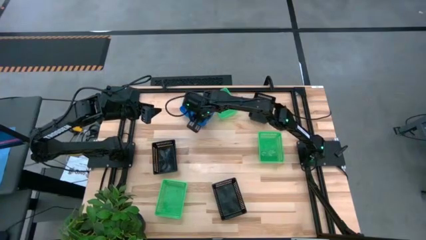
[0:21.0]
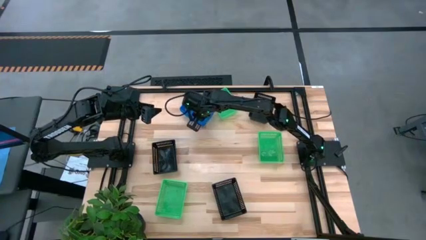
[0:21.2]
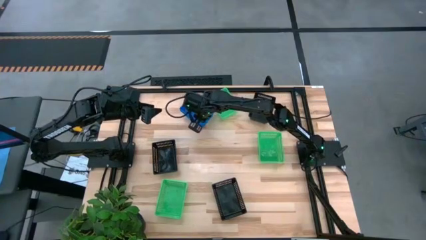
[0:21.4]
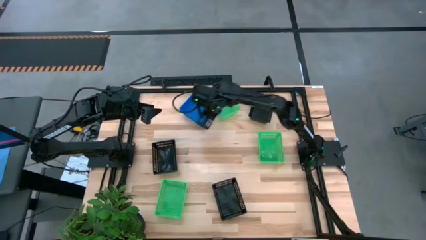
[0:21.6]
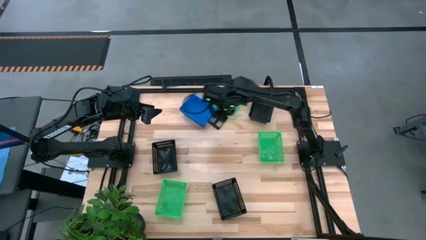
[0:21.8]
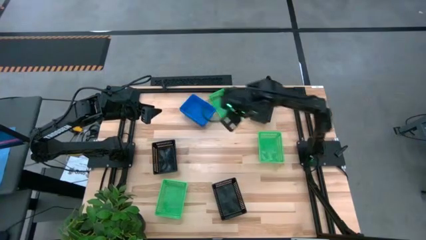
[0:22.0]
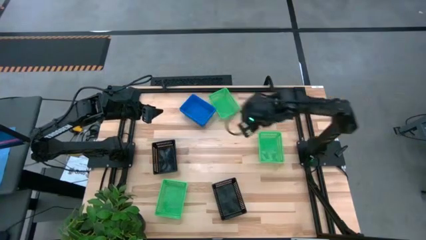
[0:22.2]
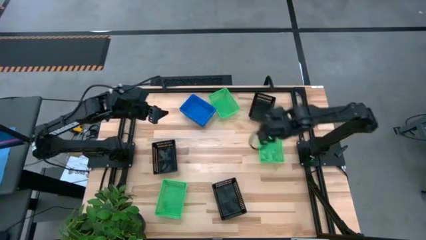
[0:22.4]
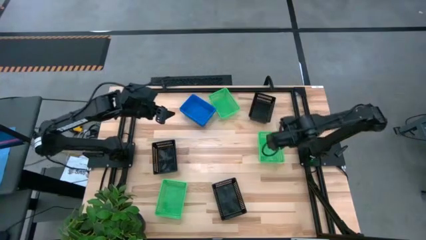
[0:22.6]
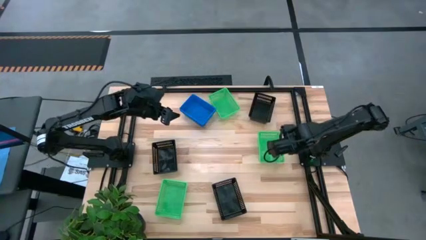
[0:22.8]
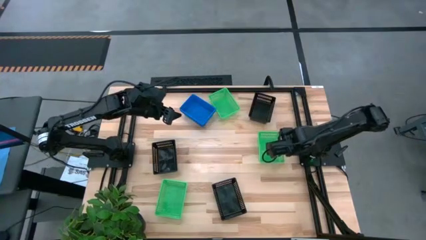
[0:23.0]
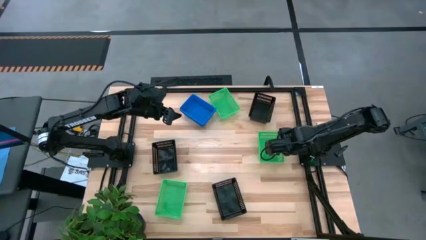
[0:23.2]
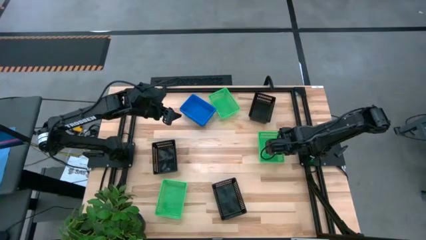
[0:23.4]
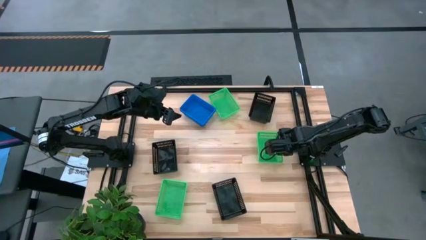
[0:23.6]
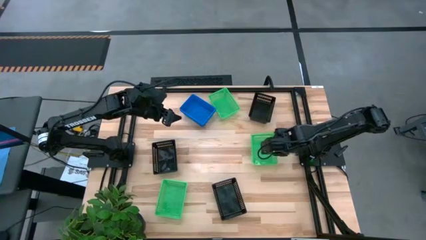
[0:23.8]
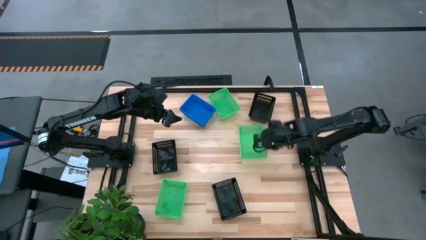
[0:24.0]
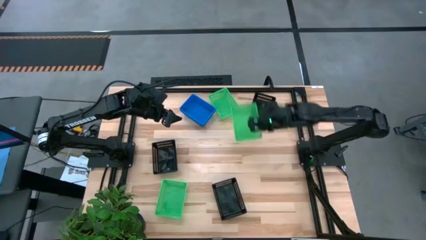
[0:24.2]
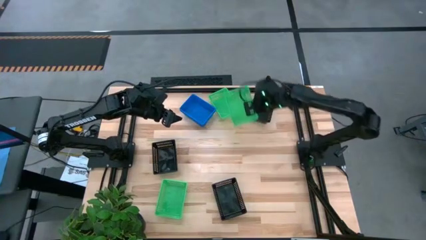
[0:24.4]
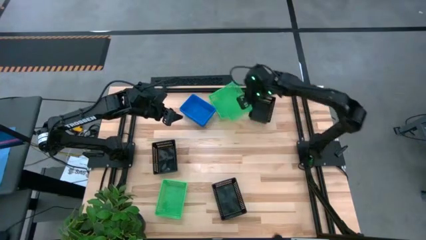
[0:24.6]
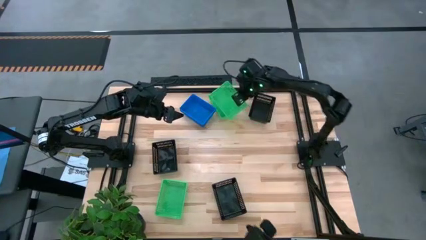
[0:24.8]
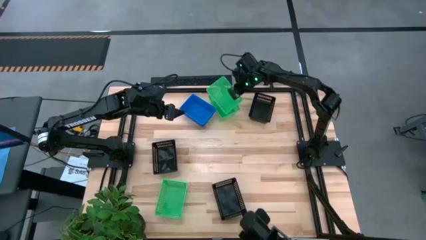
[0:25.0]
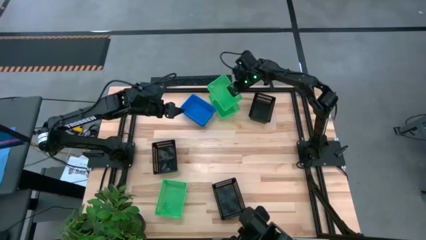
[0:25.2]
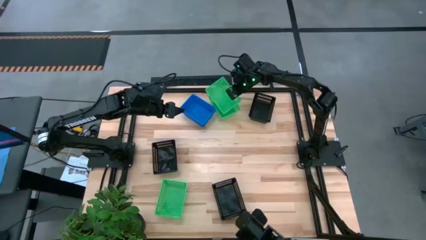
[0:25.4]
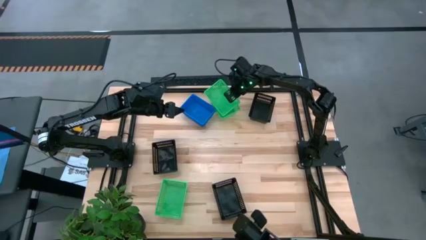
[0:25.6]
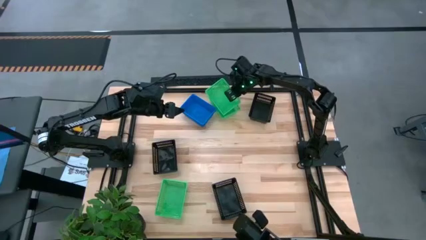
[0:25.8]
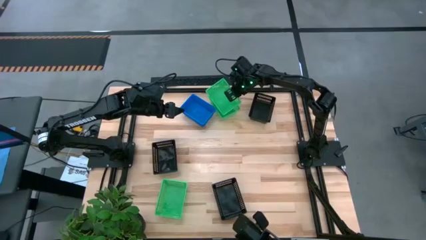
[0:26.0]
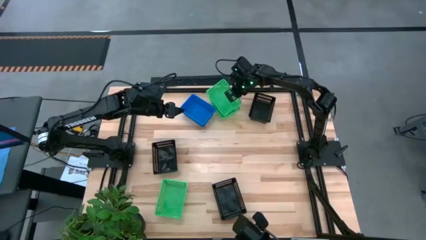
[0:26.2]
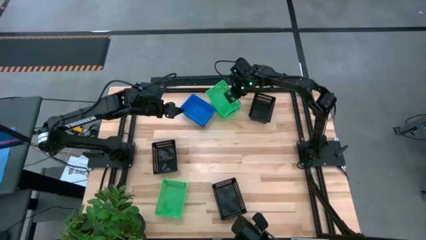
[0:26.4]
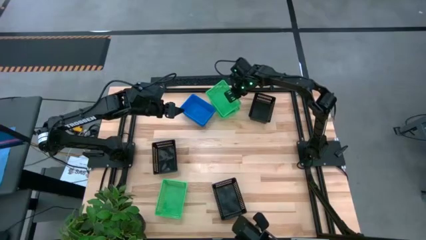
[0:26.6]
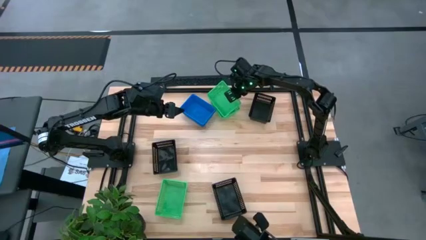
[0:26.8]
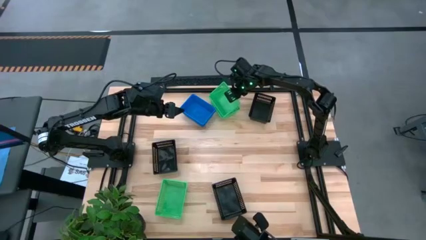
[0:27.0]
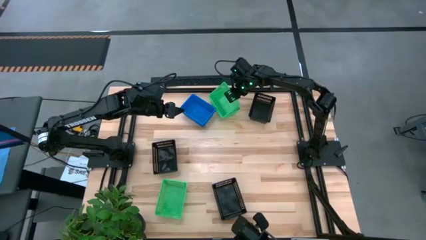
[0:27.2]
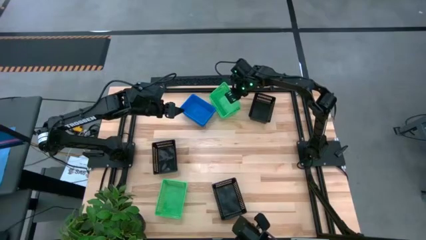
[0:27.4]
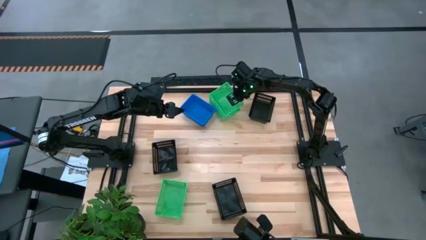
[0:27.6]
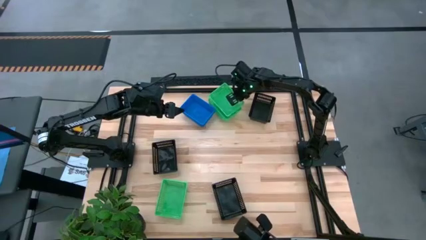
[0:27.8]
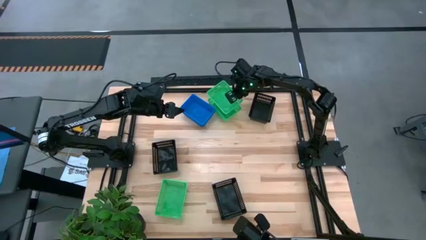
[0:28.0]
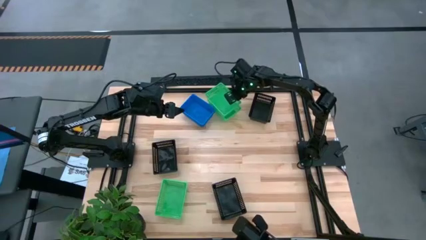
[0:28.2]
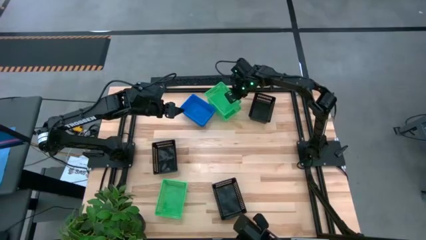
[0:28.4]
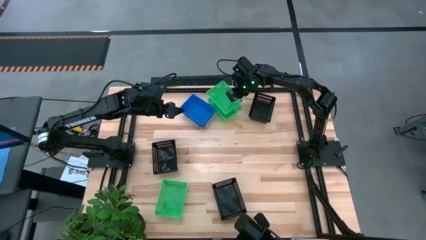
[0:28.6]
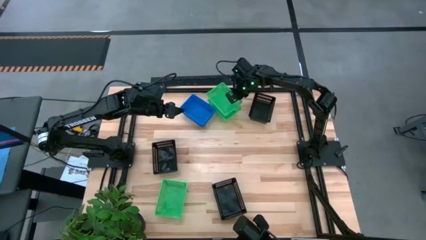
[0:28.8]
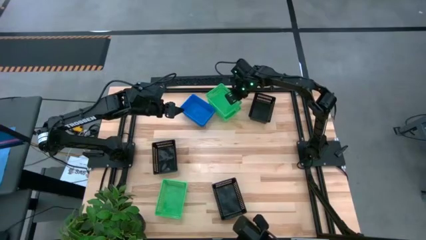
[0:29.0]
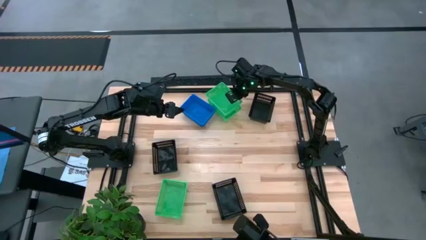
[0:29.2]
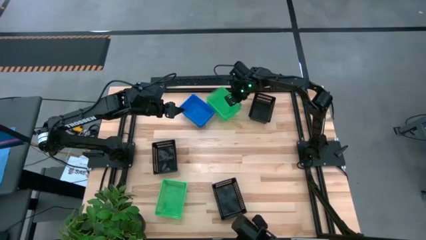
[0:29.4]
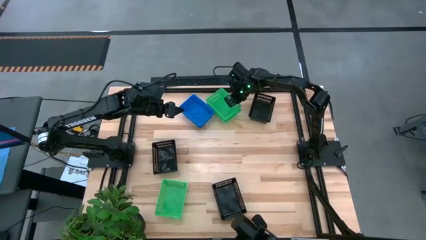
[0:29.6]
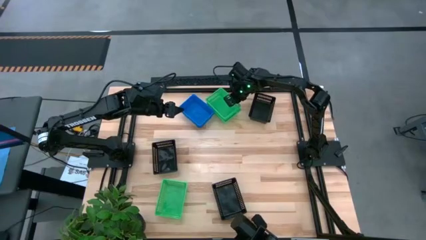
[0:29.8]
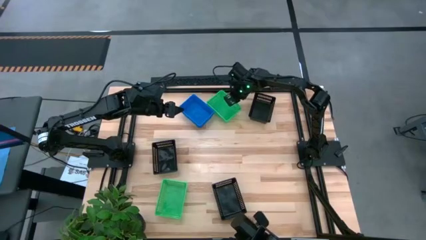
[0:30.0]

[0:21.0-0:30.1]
Stack the middle right green bin on the top green bin

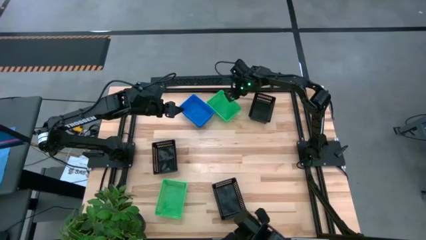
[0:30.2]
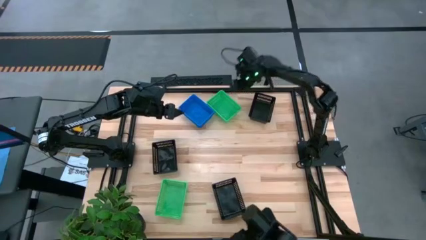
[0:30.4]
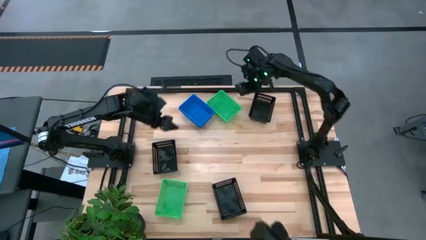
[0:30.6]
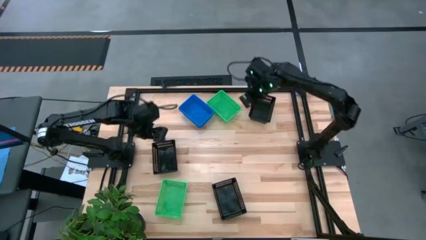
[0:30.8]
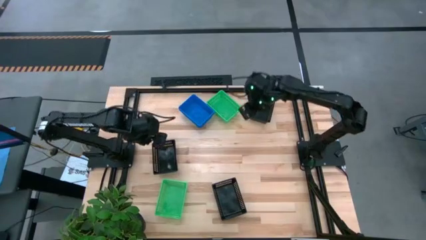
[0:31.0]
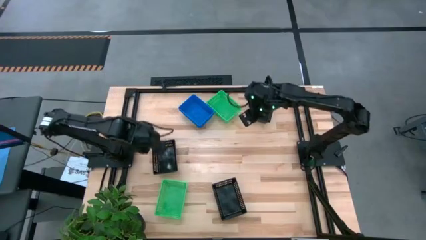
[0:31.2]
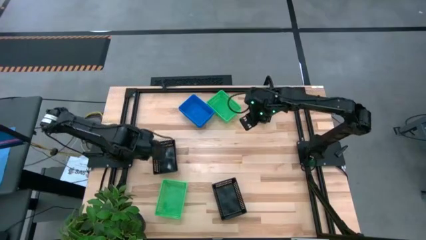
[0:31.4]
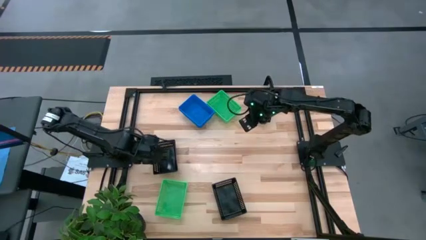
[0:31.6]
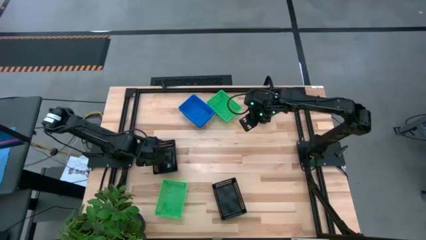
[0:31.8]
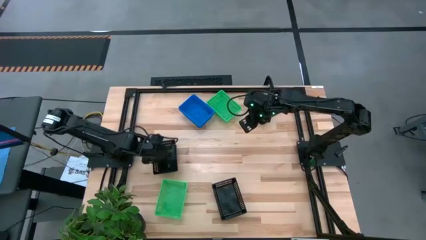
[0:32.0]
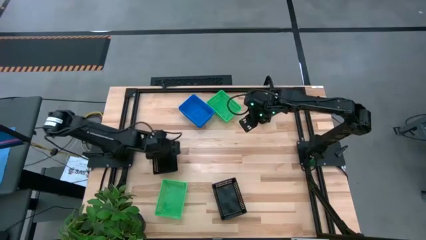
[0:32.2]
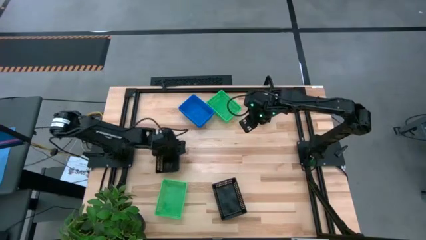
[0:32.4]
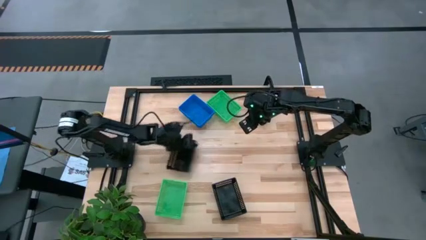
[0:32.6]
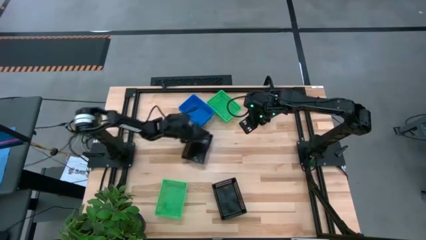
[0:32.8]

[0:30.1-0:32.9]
Move the middle left black bin to the center of the table

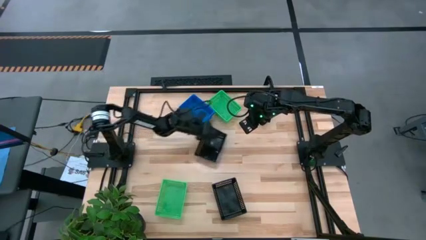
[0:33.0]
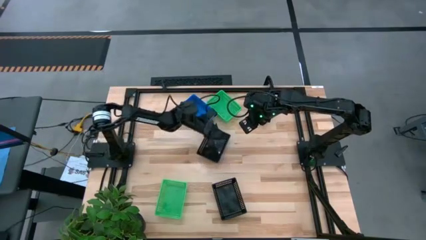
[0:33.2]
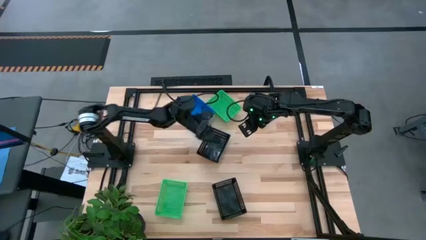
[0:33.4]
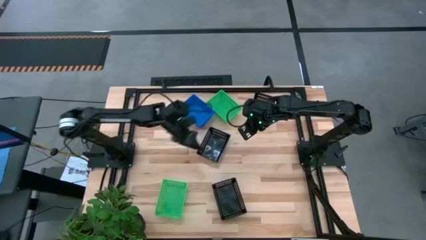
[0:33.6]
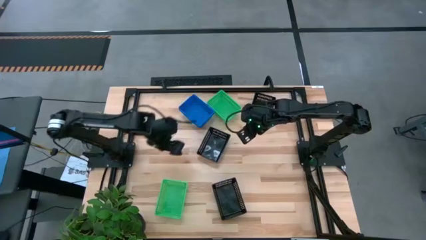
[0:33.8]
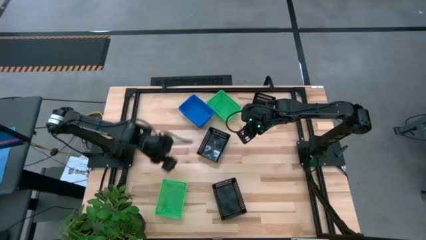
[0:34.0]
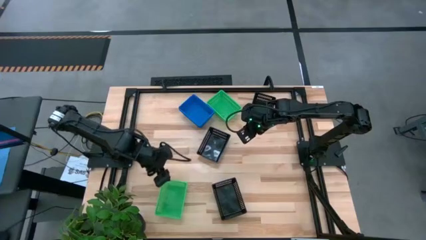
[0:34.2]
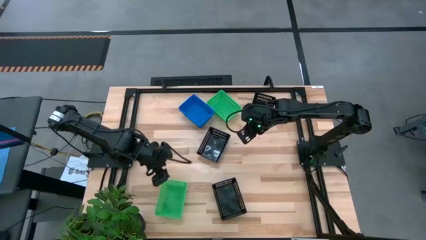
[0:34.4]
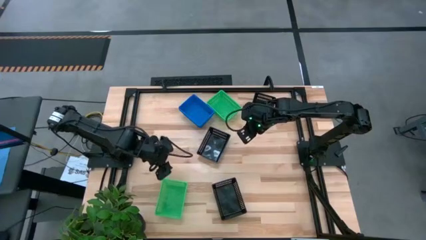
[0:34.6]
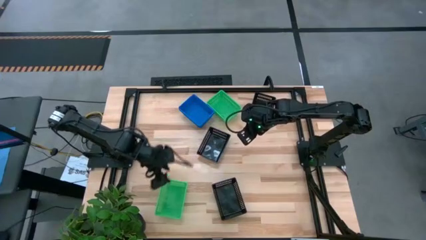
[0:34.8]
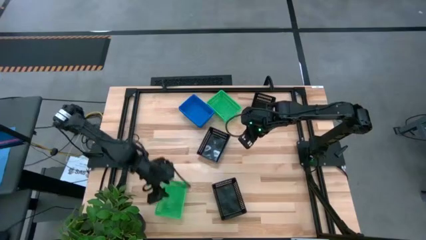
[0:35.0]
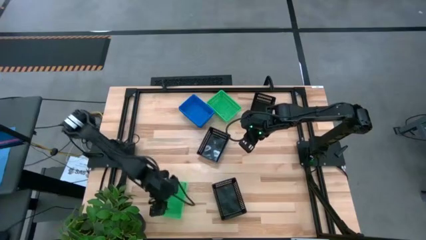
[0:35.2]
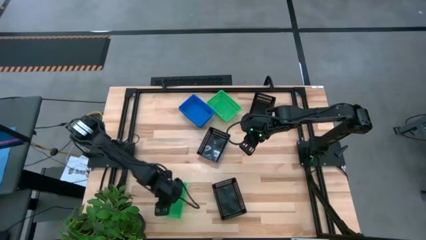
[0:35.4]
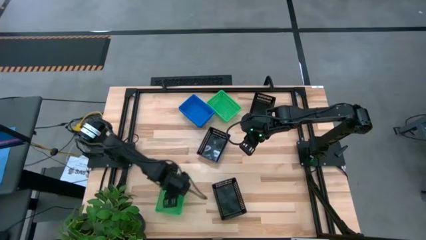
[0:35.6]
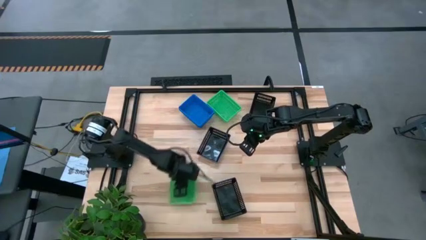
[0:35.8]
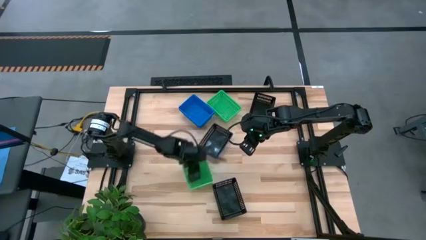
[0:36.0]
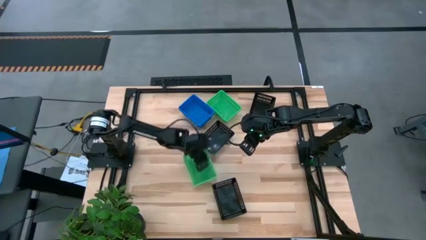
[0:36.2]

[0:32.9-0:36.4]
Move the bottom green bin to the middle left of the table
